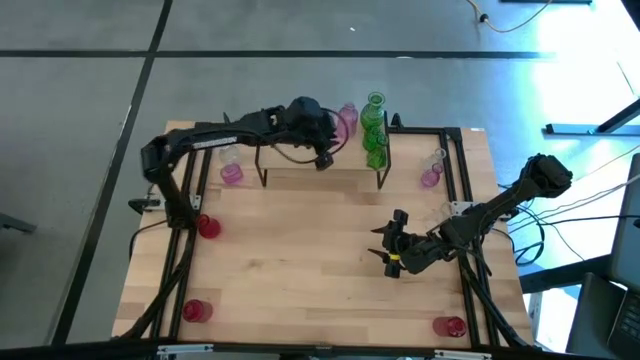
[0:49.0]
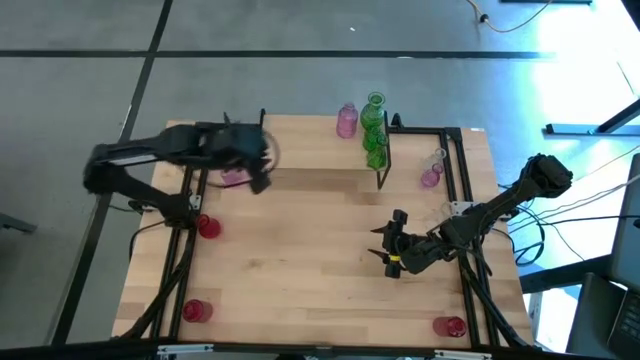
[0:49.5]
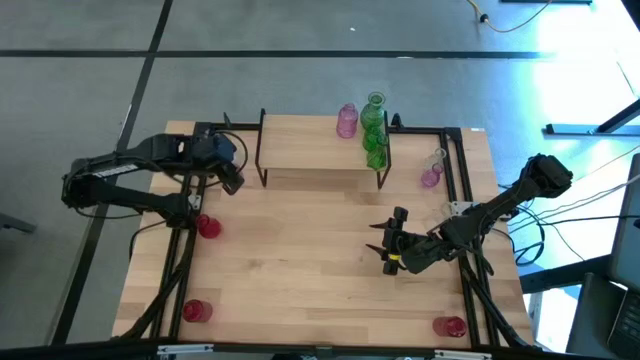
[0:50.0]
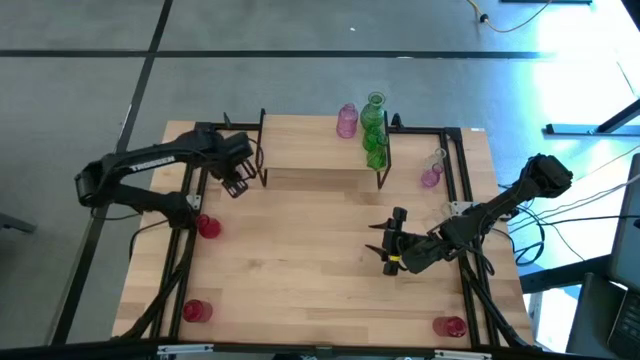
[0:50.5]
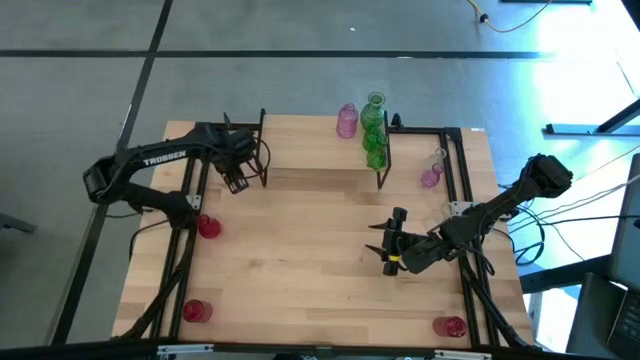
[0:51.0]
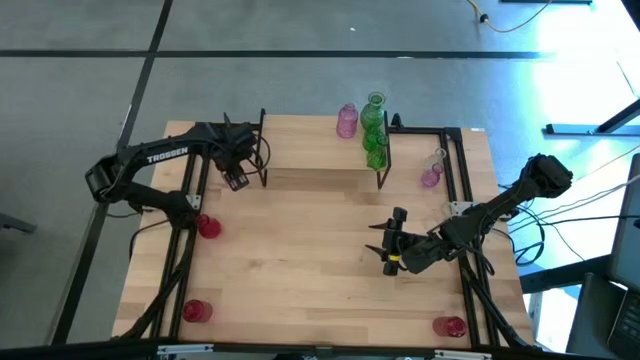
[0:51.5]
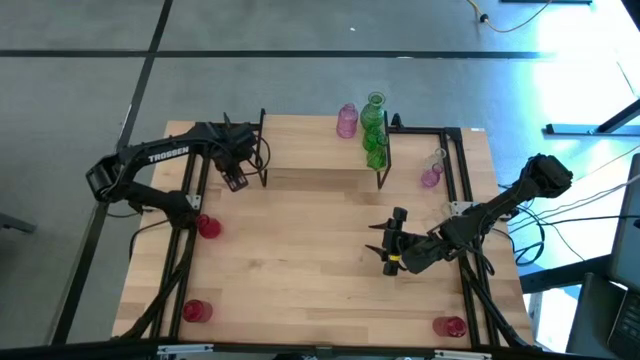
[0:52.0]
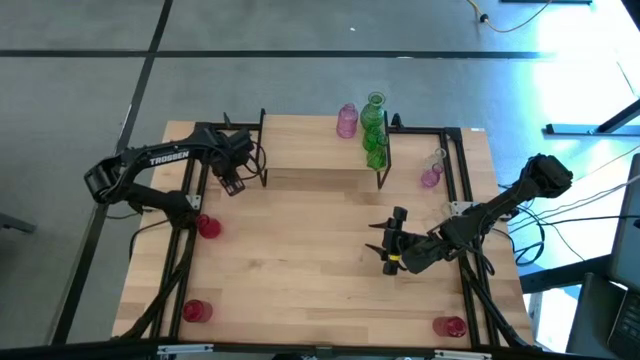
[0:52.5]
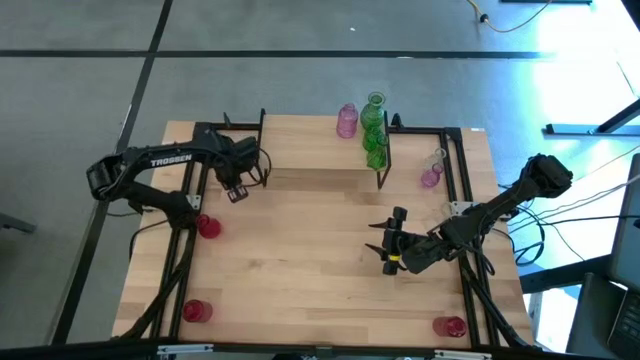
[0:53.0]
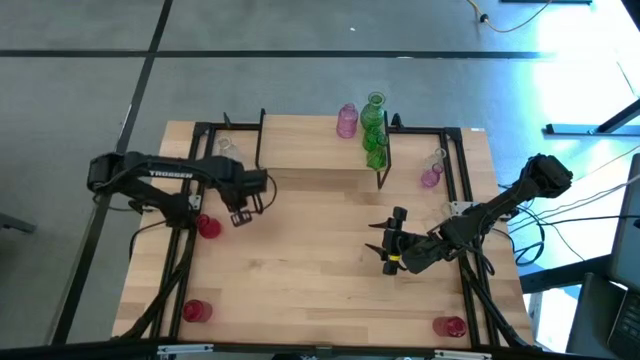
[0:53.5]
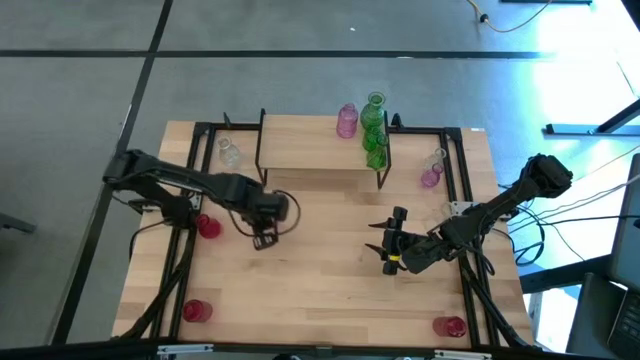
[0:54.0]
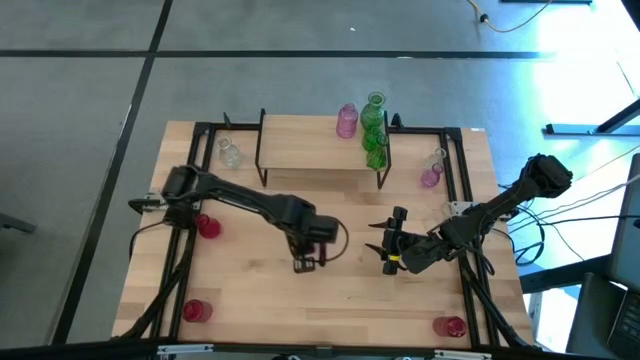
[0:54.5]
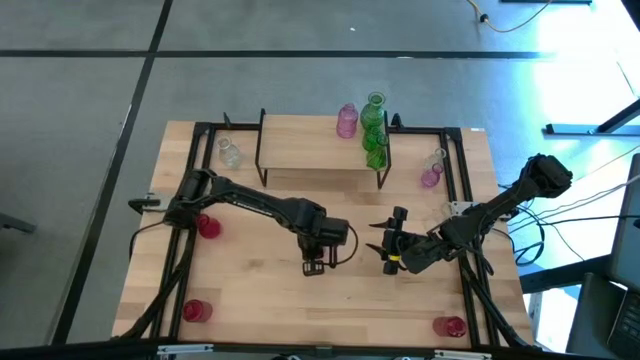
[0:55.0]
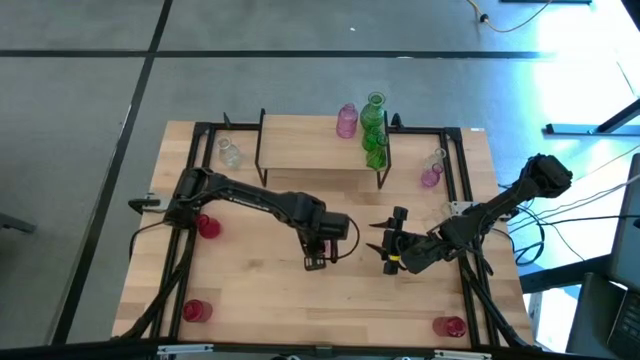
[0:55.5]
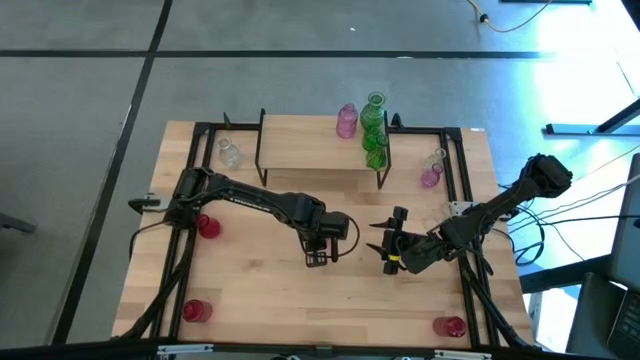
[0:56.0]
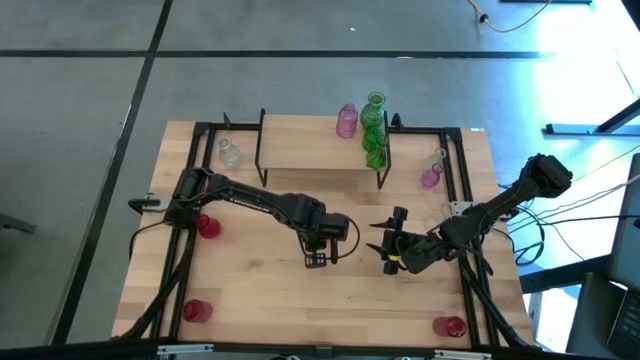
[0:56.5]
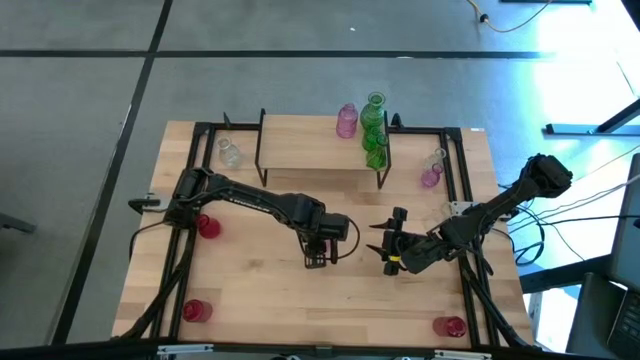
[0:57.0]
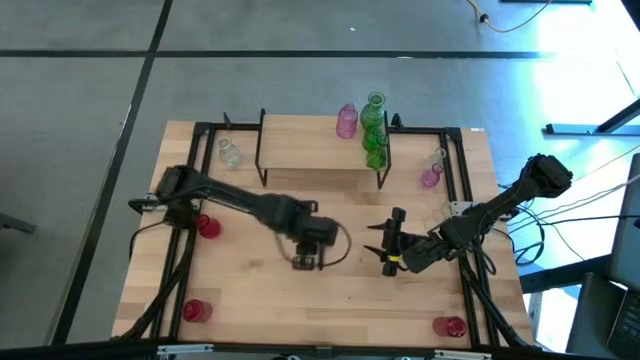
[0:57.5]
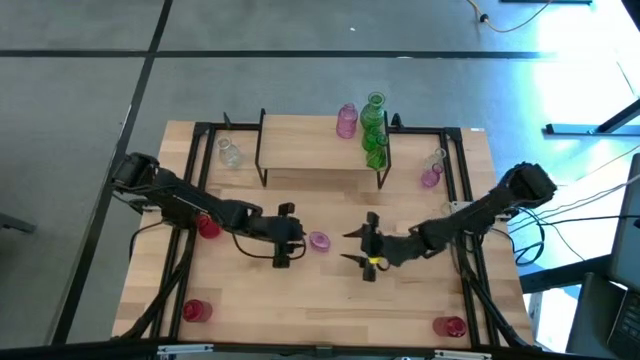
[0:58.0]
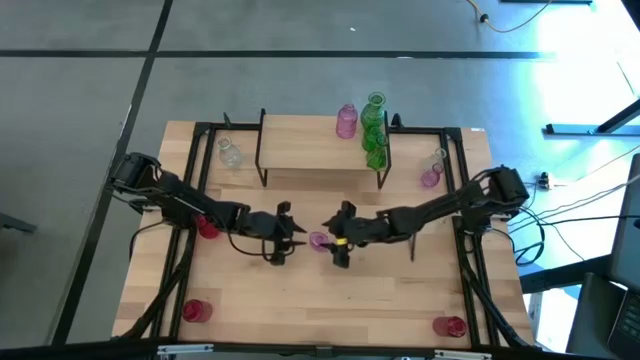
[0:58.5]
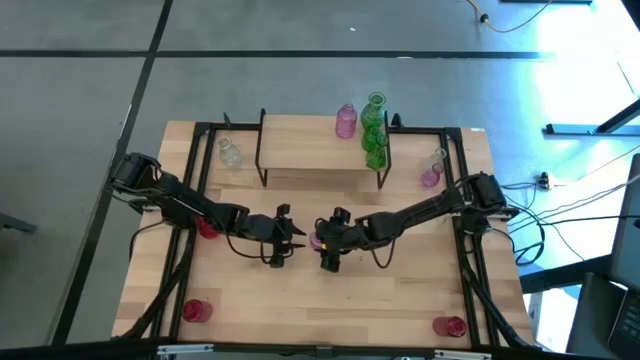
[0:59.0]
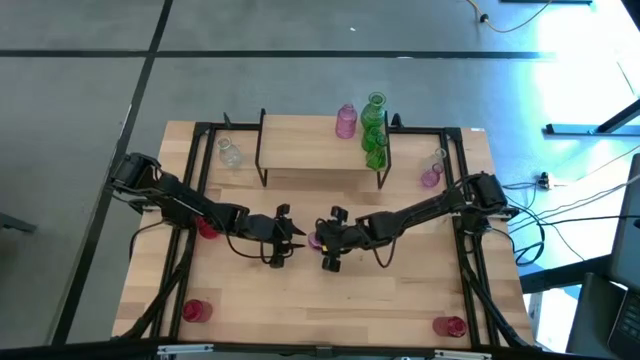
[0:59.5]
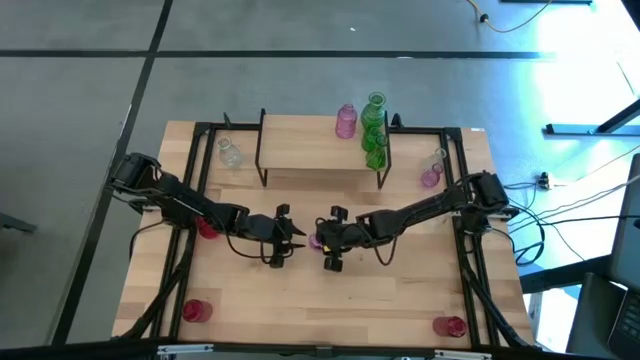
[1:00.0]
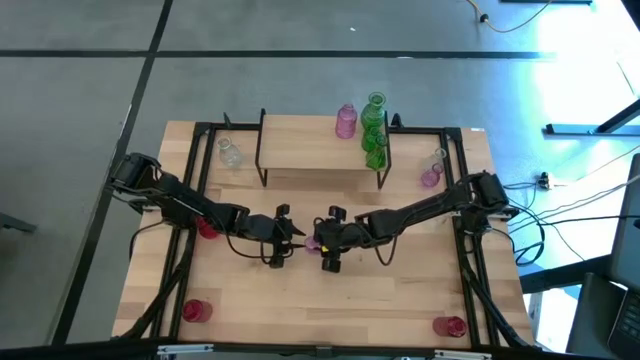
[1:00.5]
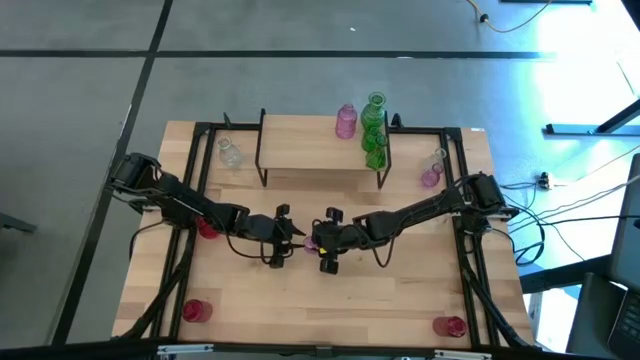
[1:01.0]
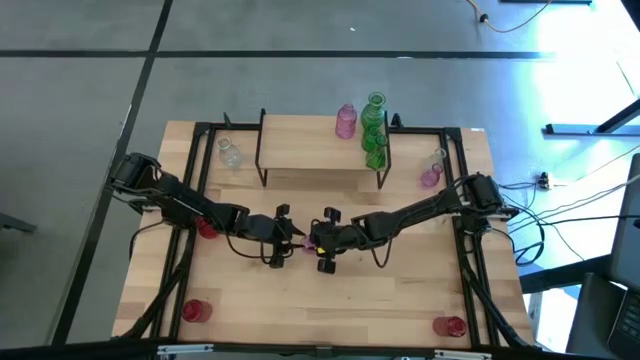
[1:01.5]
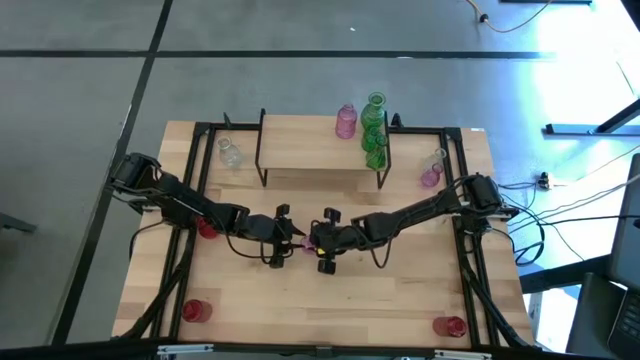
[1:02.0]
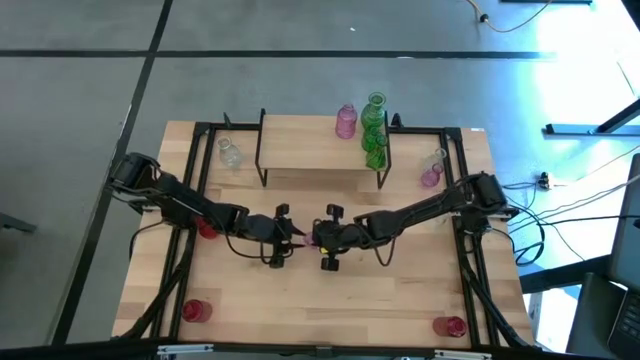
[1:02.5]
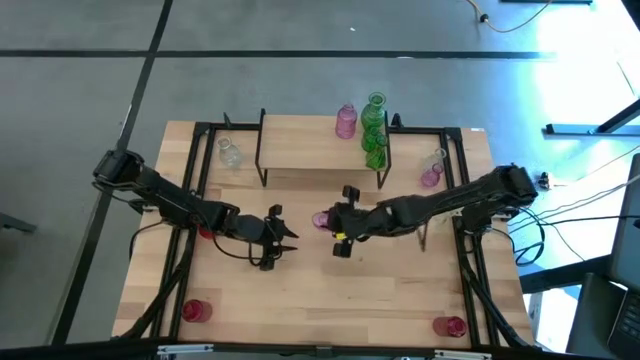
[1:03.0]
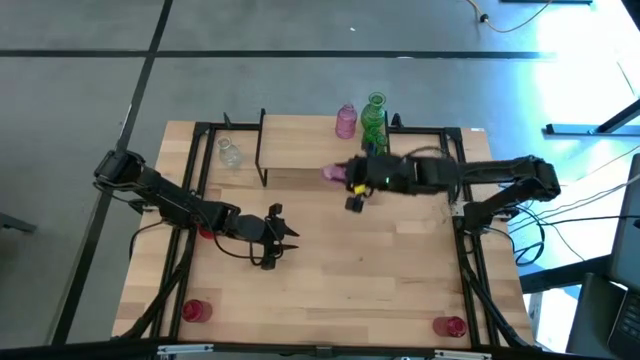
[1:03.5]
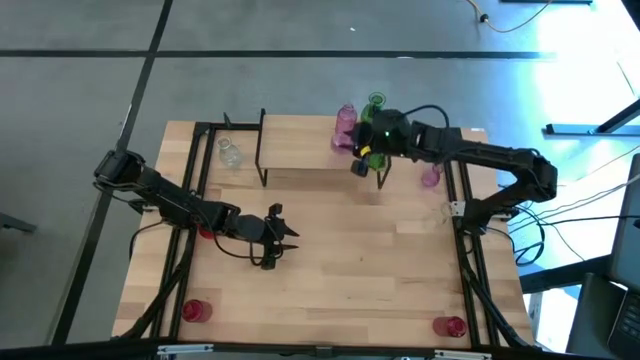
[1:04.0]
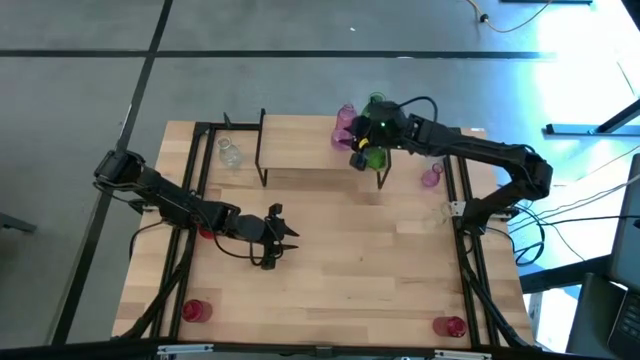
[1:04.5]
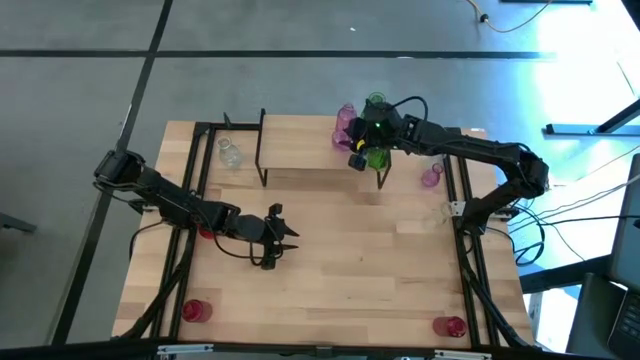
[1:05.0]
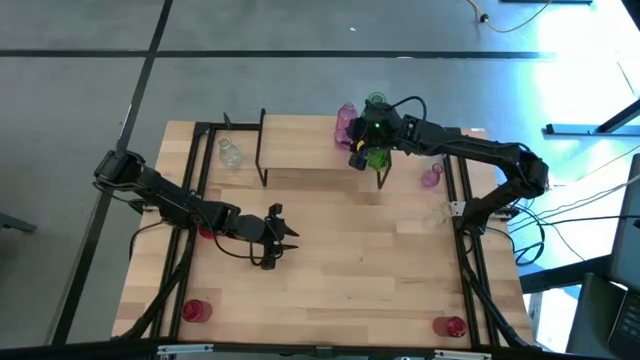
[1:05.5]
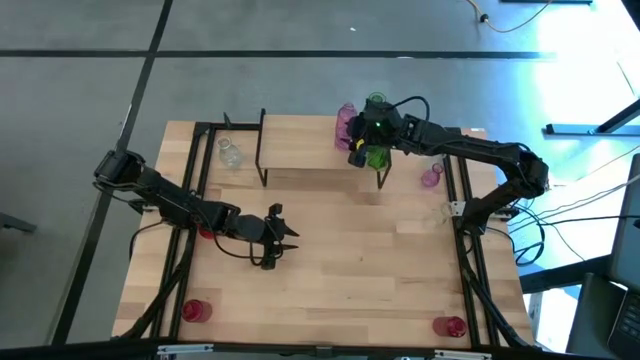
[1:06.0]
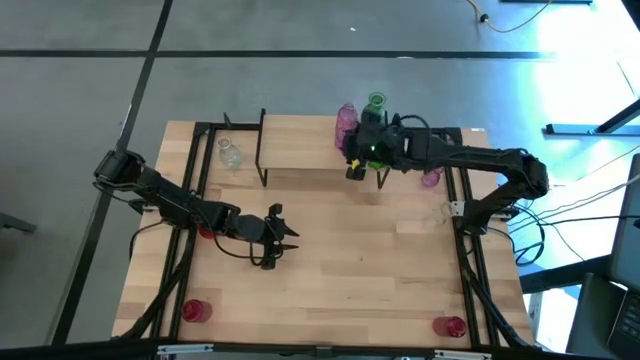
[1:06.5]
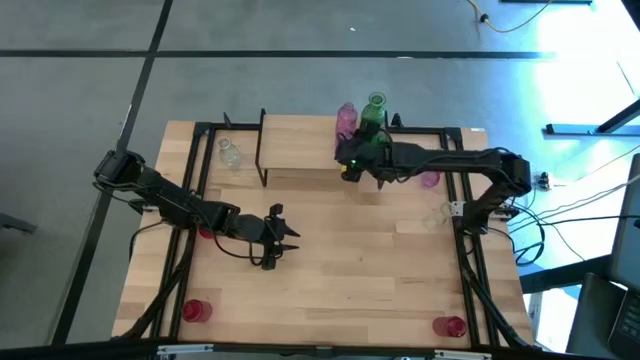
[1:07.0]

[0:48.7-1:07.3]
Task: sort vases onto shelf
Put the left pink vase on the shelf aligned with the other pink vase

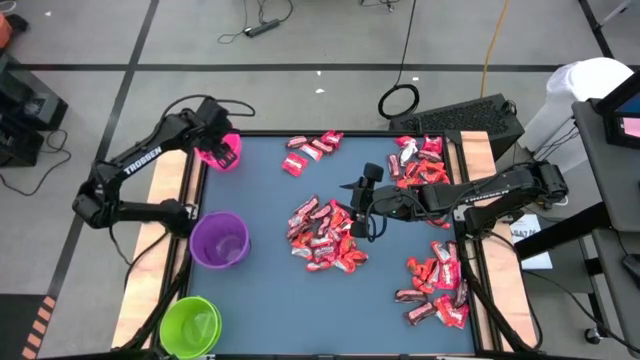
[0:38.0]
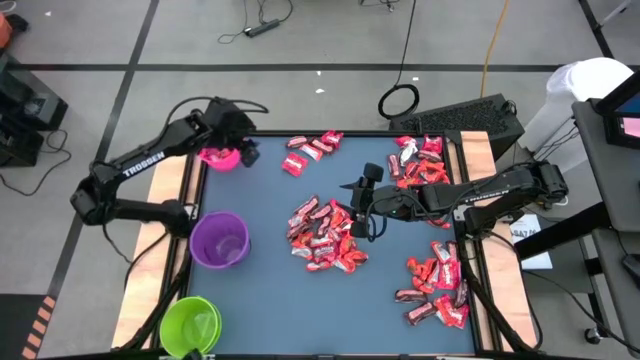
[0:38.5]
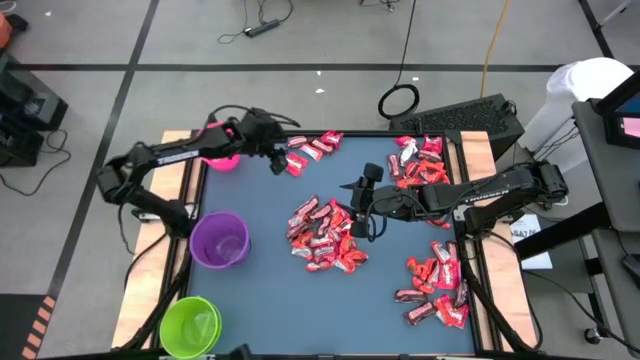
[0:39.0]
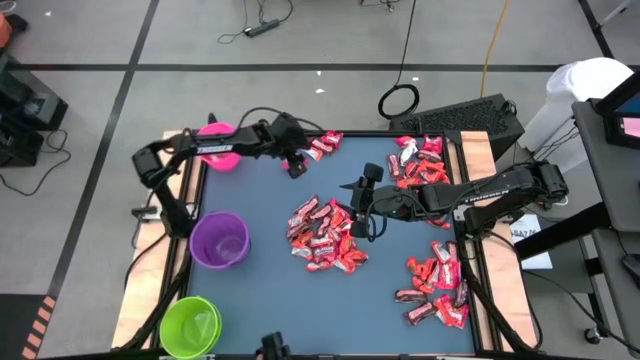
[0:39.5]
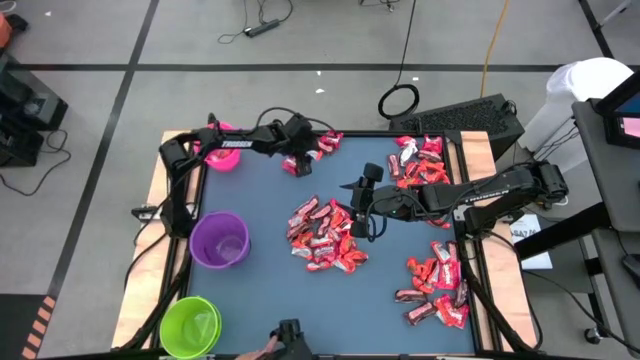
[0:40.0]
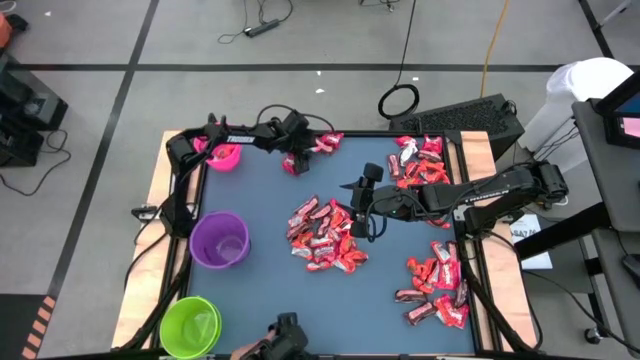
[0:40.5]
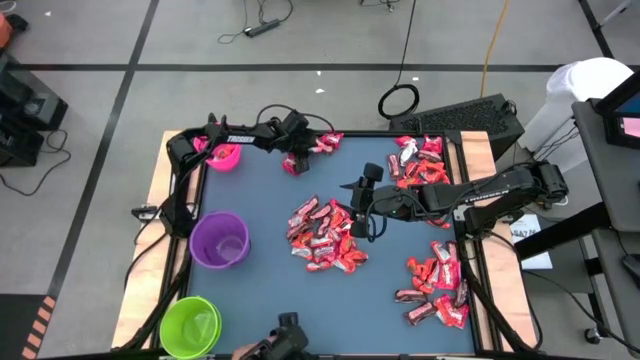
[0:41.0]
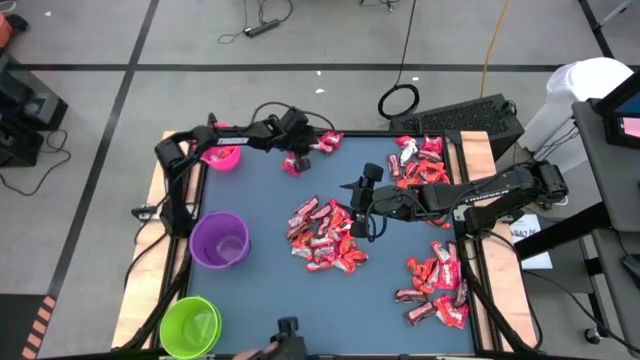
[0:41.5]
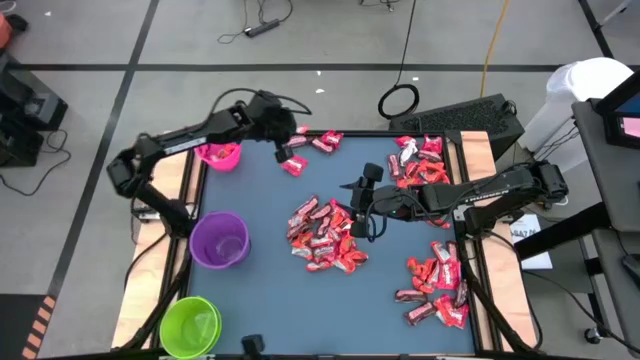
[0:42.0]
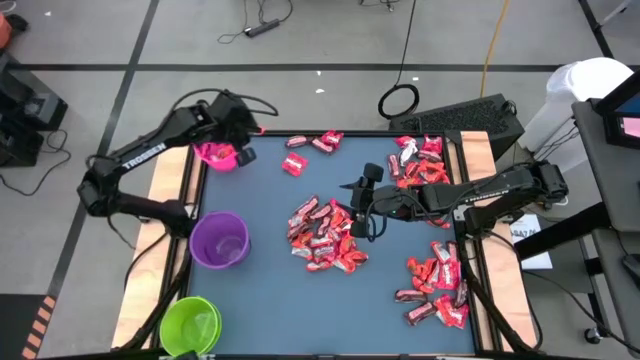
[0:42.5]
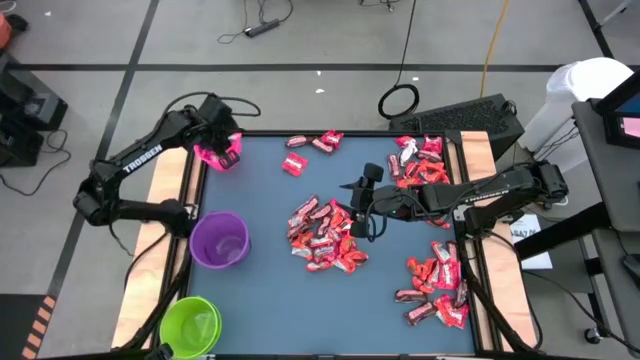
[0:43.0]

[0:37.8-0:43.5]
Task: Organize candy in baskets
Put the orange chocolate into the pink bucket
